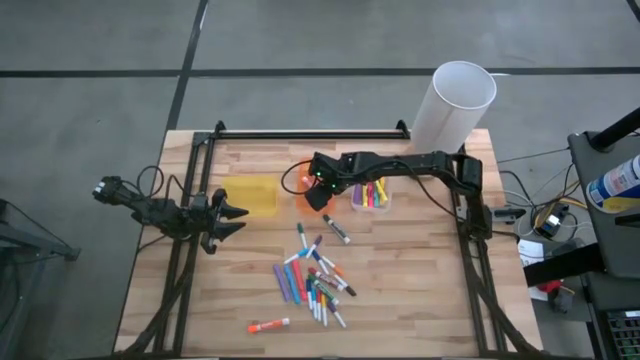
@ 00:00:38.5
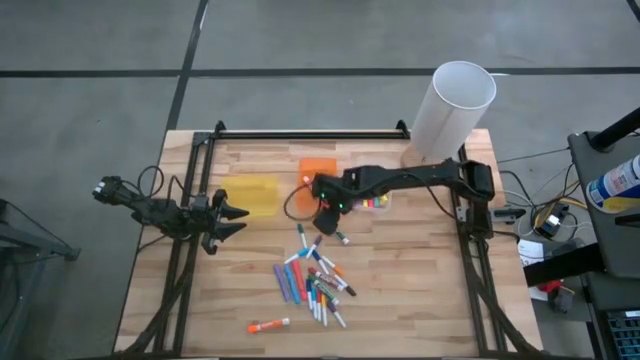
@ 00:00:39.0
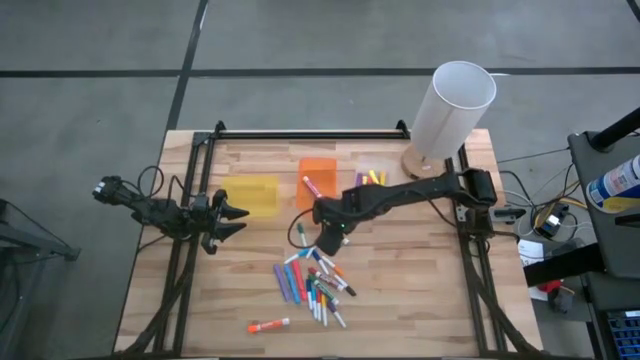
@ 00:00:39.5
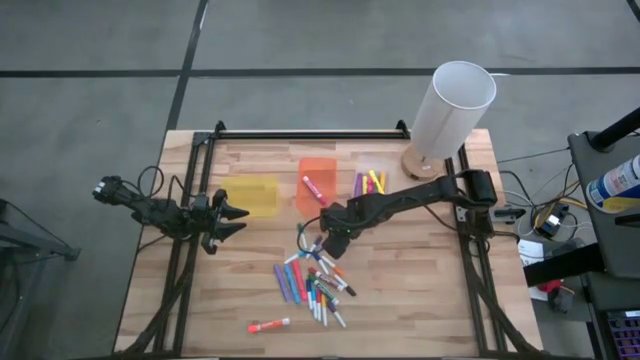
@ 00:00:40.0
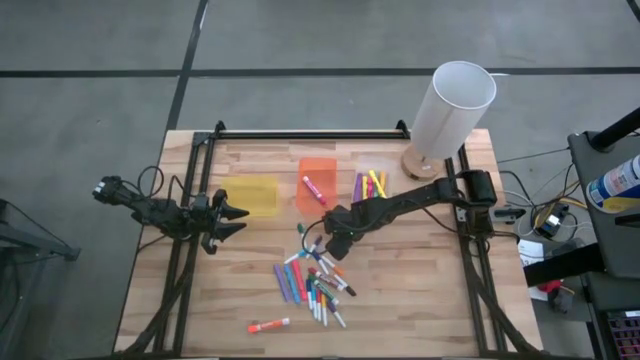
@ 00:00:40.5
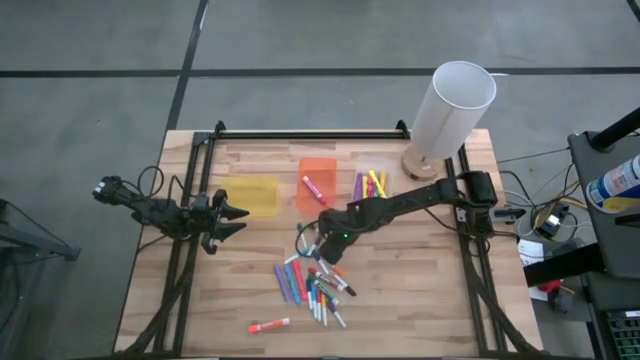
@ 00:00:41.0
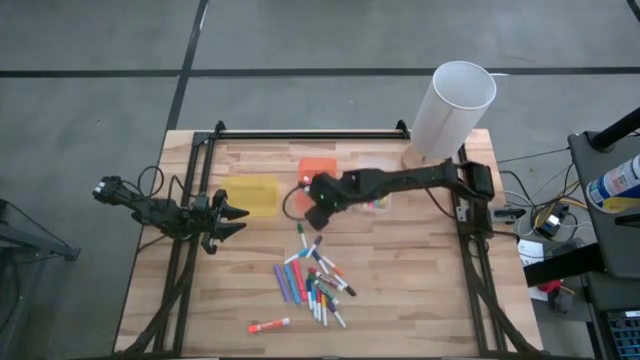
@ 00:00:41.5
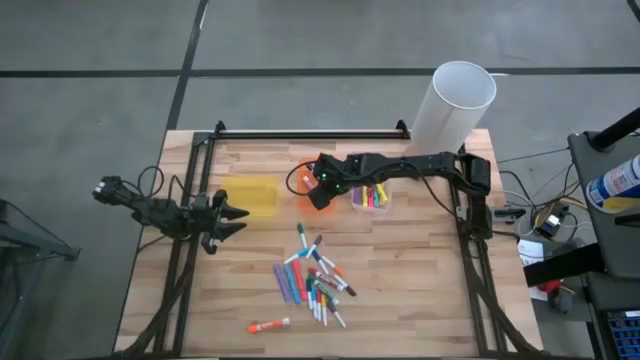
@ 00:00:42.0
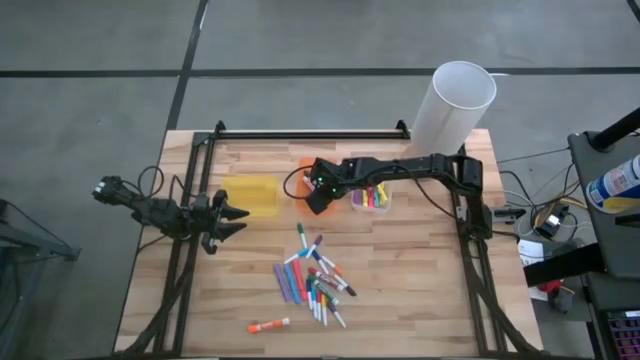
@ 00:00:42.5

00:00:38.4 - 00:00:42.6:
Task: Pick & Place Markers
Put the dark green marker into the orange bin

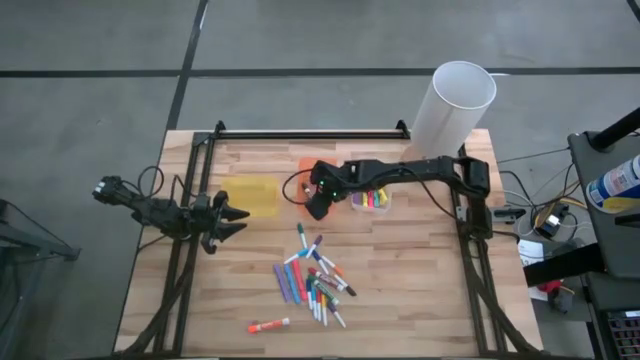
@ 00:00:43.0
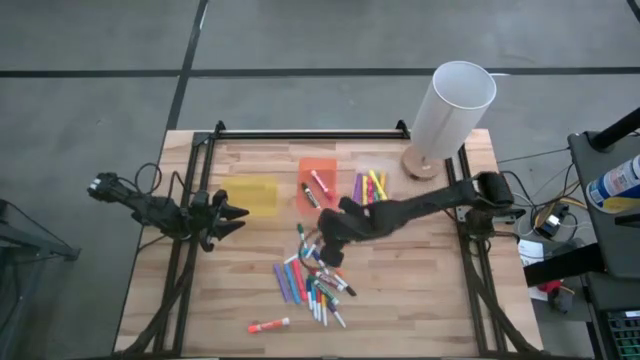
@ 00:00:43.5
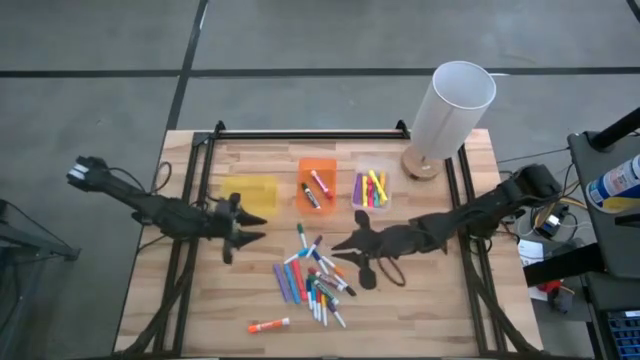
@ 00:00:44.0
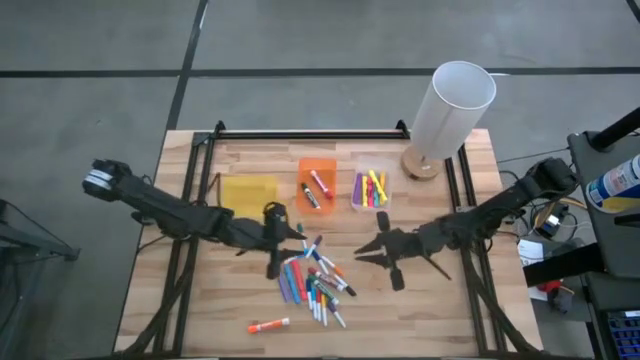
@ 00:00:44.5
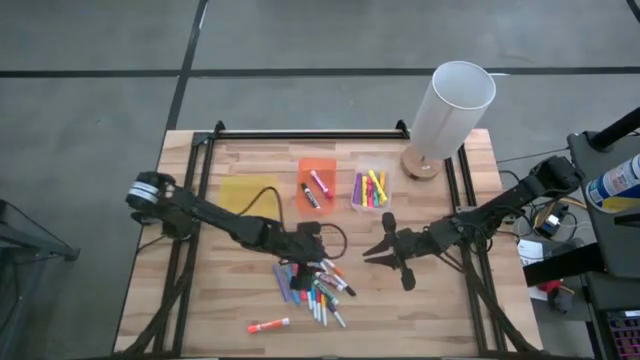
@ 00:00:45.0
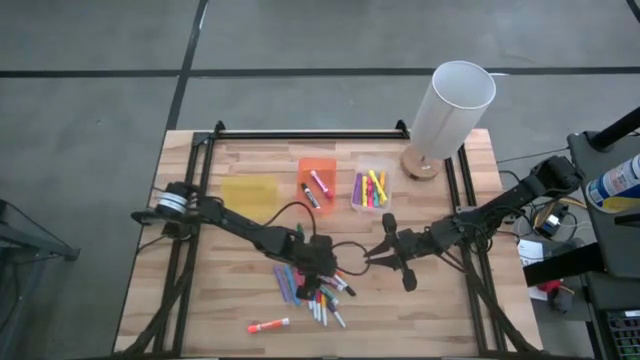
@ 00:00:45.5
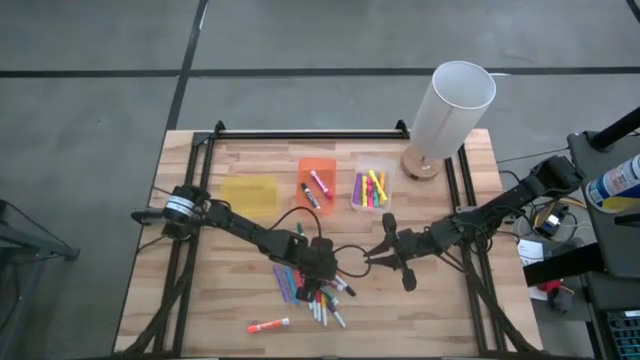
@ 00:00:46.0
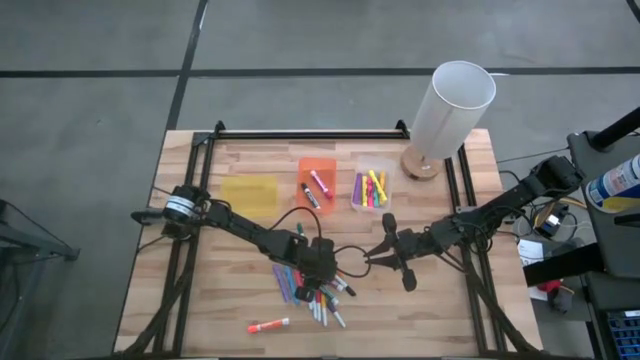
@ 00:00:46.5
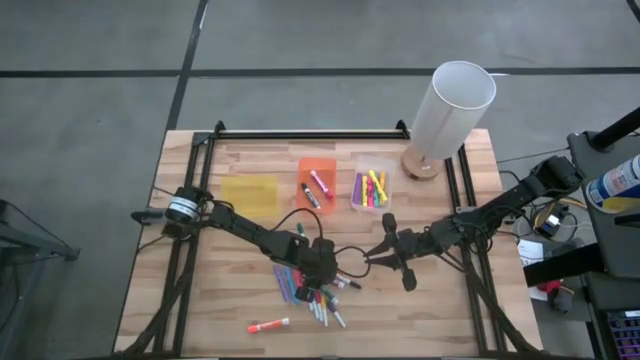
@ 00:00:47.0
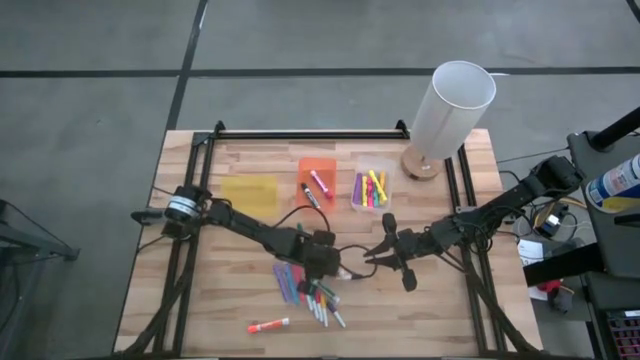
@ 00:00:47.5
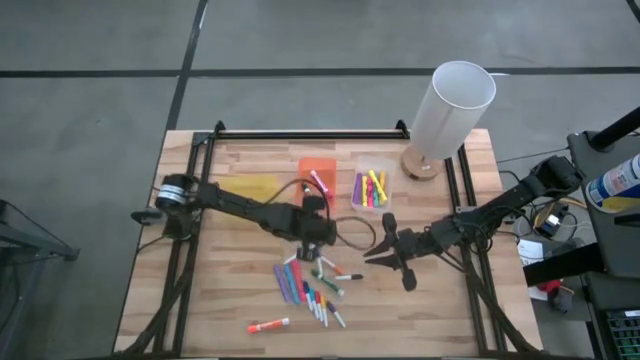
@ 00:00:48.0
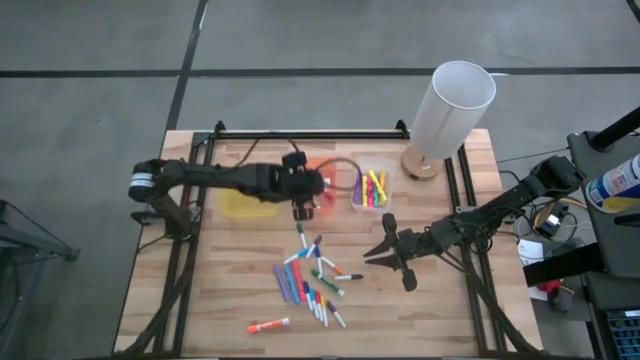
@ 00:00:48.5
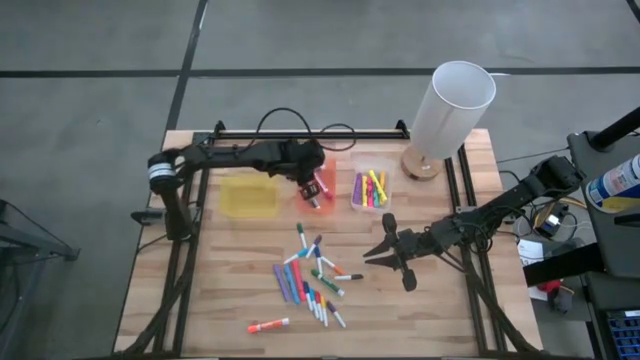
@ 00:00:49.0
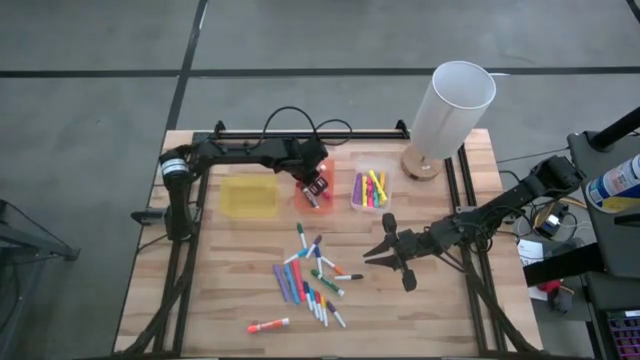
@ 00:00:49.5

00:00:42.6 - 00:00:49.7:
Put the dark red marker into the orange bin

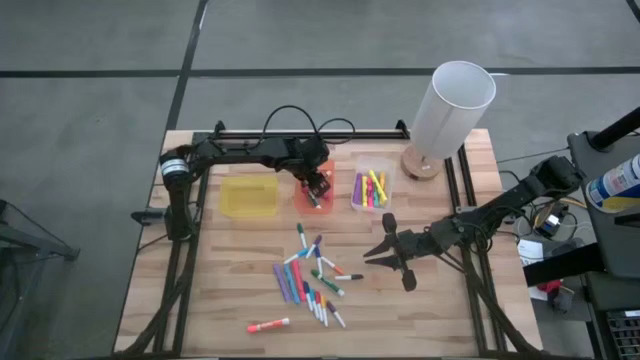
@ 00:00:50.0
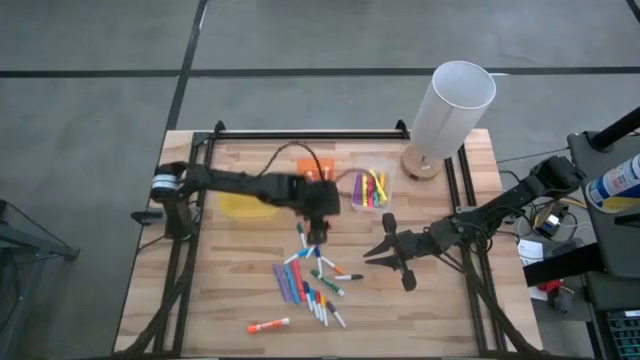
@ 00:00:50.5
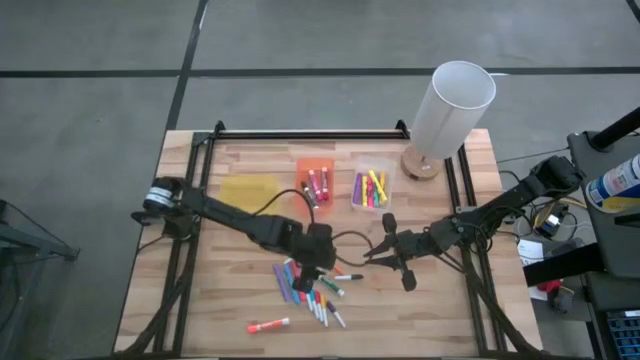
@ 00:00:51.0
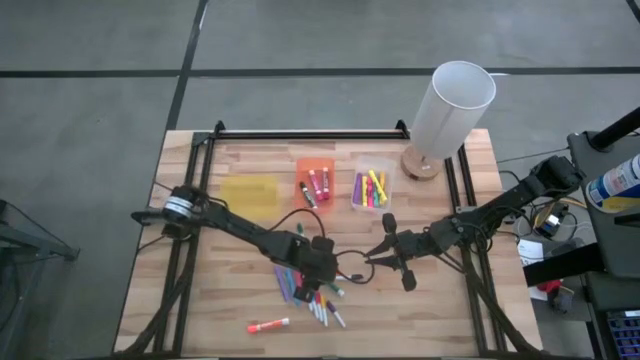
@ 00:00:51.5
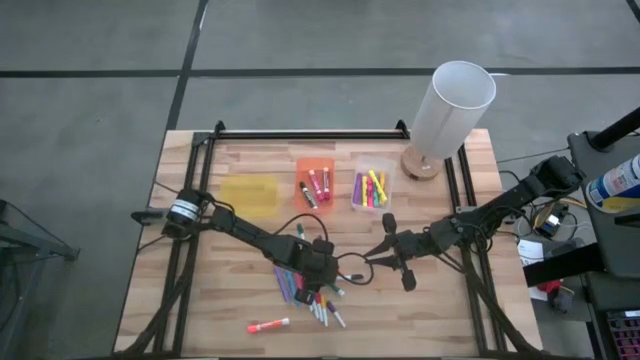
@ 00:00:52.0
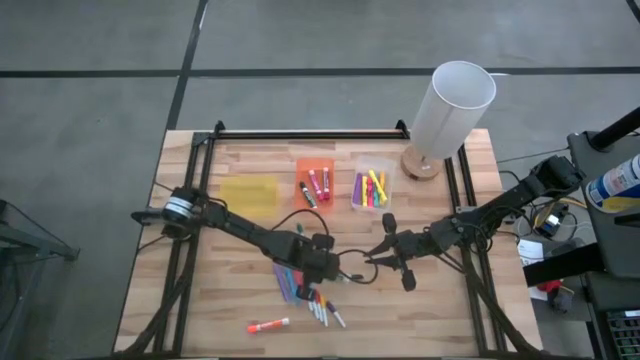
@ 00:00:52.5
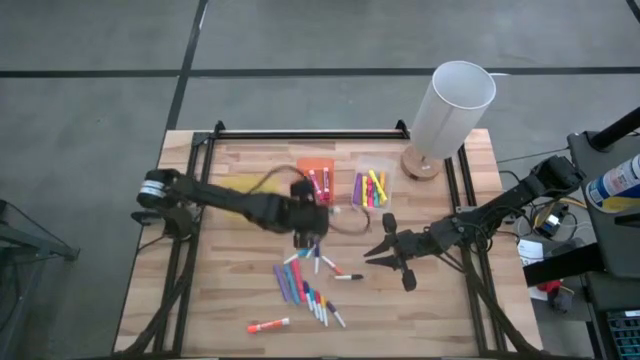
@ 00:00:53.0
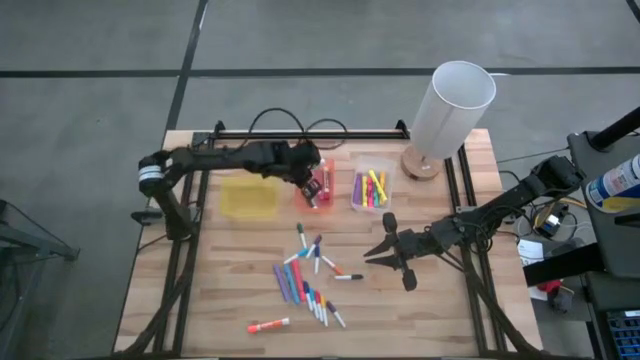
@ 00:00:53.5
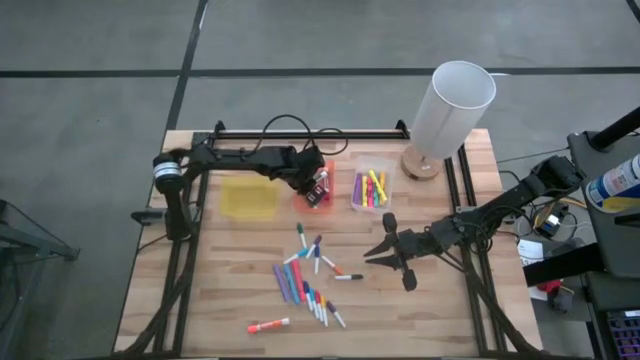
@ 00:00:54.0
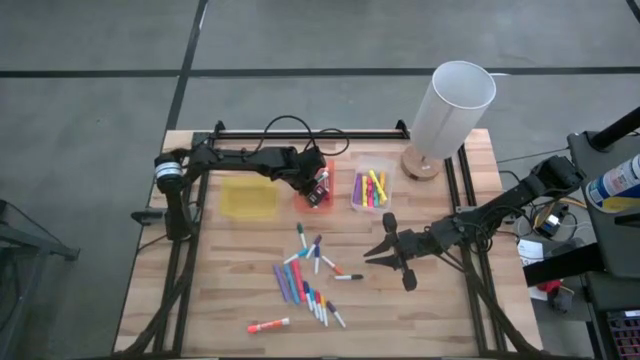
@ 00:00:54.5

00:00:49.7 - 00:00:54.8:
Put the green marker into the orange bin

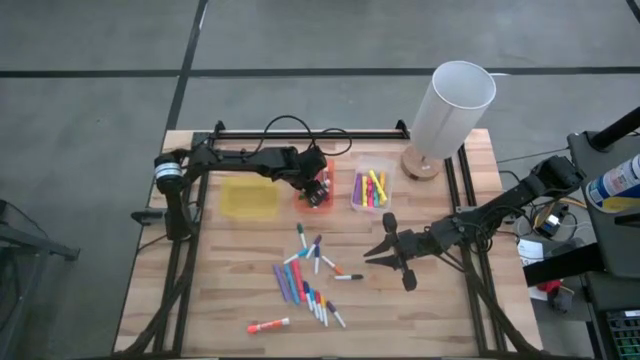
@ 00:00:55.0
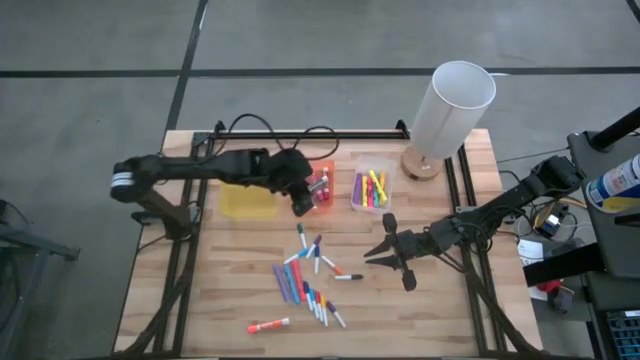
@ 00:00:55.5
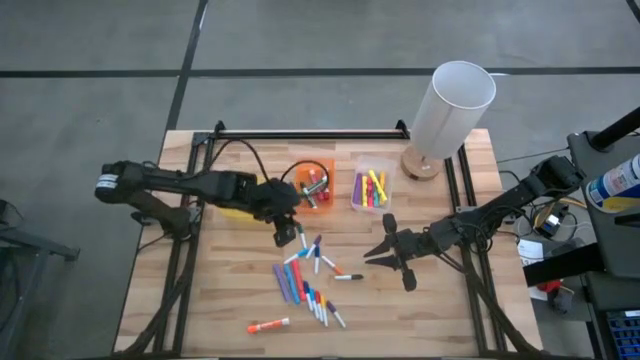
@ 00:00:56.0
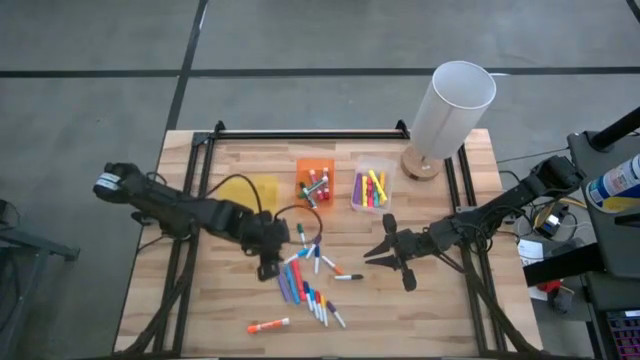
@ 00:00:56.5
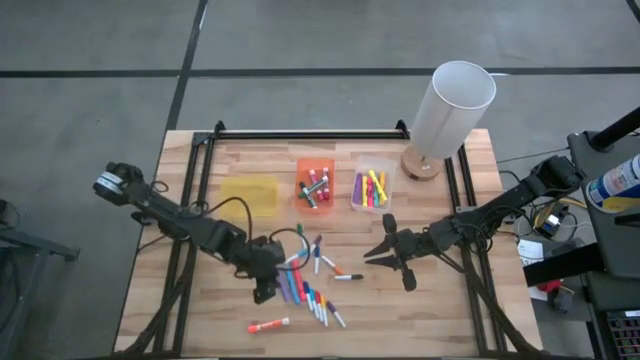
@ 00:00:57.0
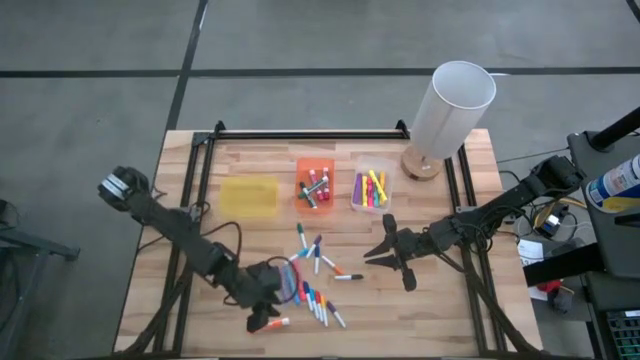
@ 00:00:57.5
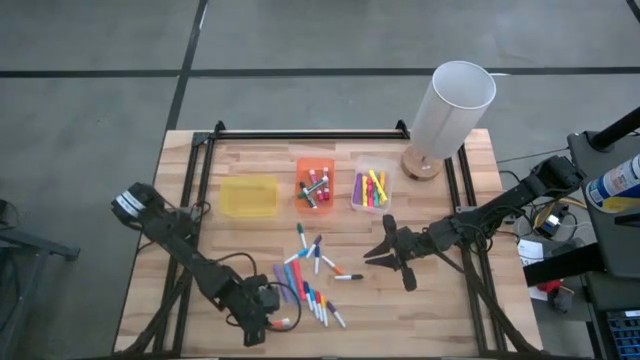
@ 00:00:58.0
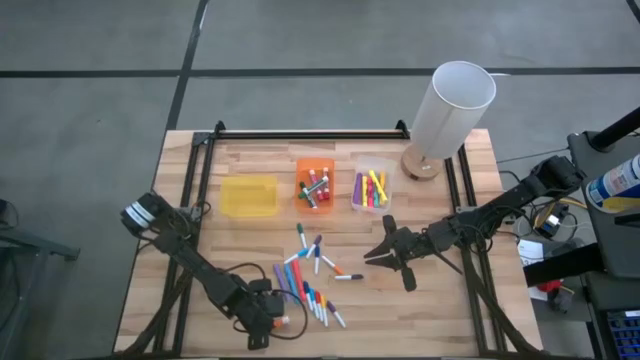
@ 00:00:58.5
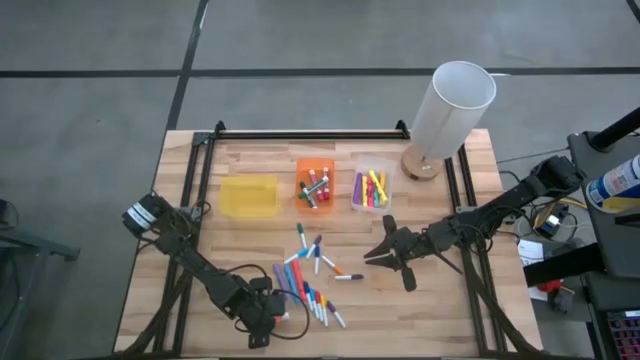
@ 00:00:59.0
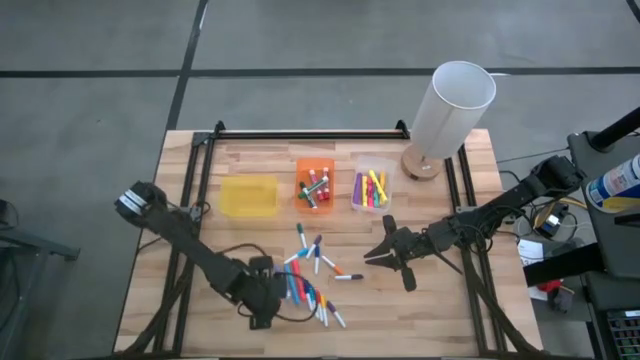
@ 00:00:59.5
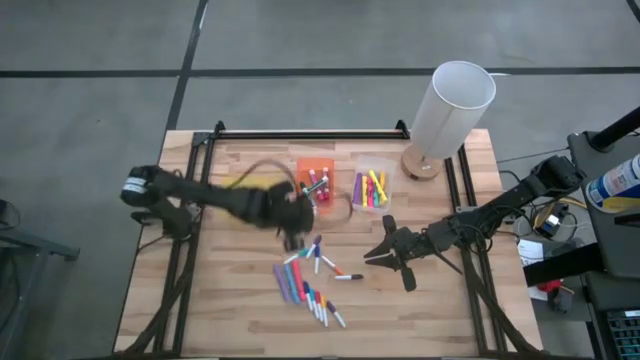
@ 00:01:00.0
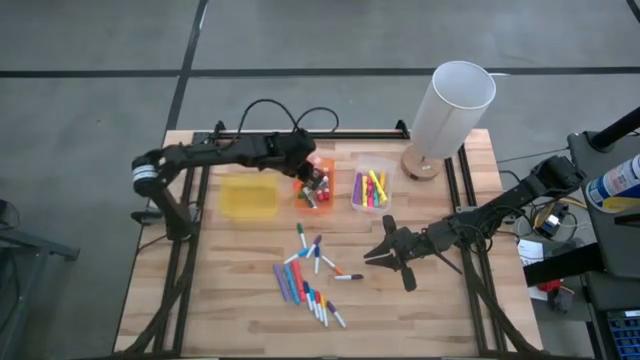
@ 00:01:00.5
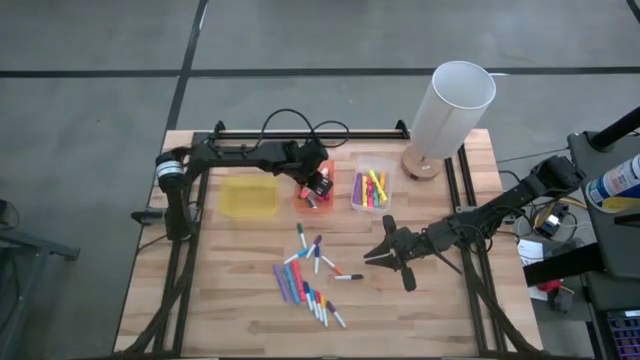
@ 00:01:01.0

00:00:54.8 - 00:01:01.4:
Put the orange marker into the orange bin
